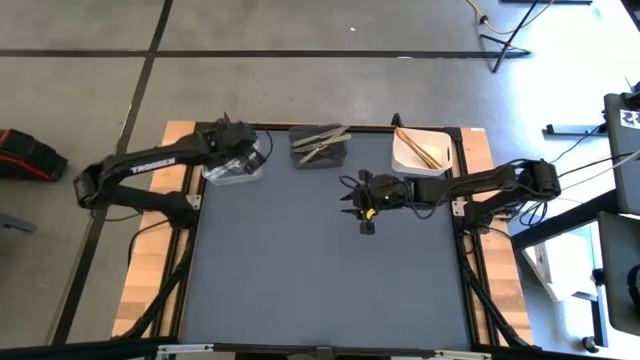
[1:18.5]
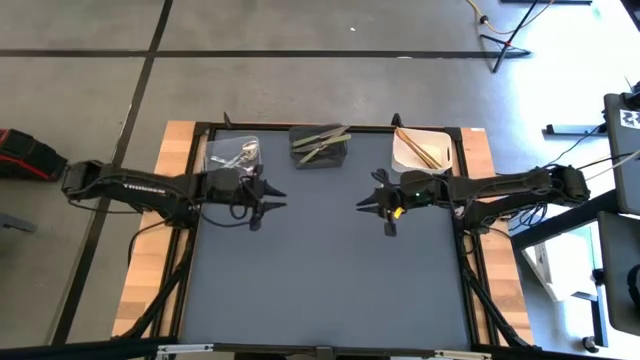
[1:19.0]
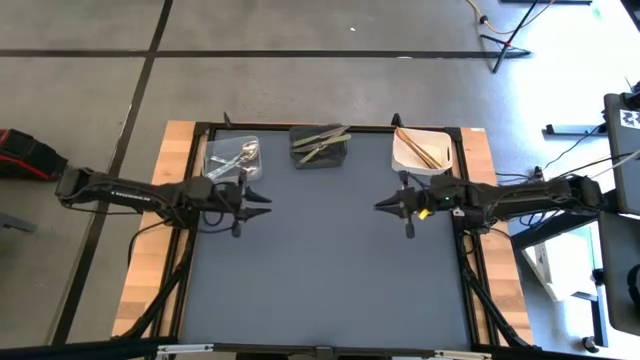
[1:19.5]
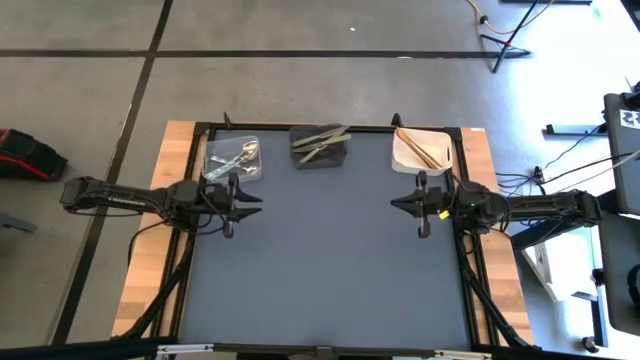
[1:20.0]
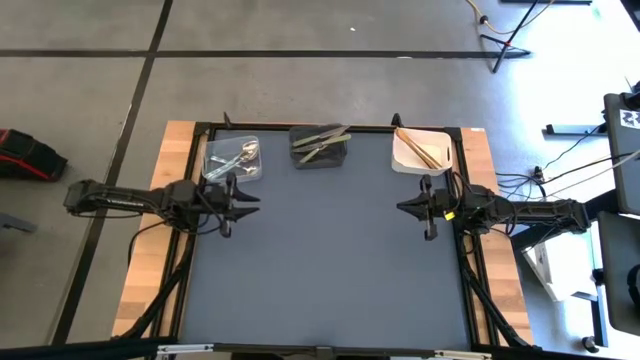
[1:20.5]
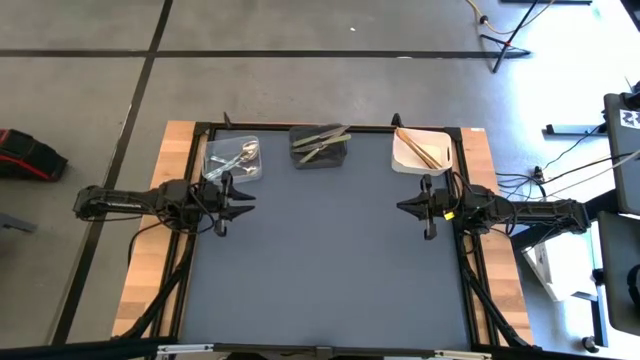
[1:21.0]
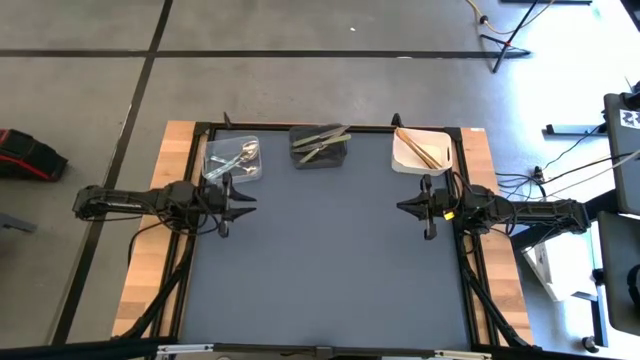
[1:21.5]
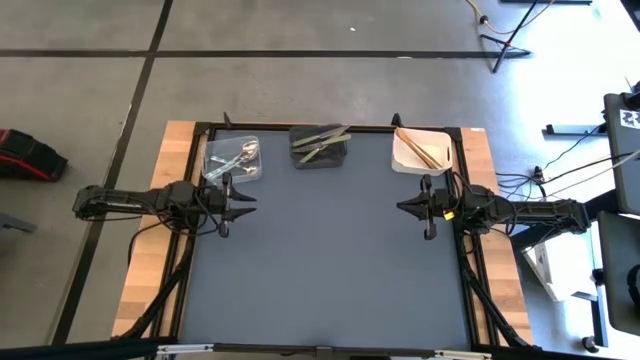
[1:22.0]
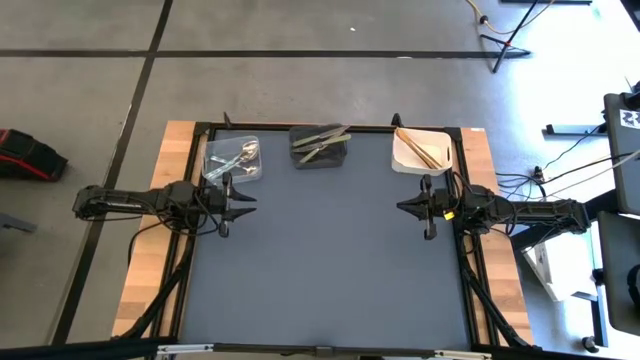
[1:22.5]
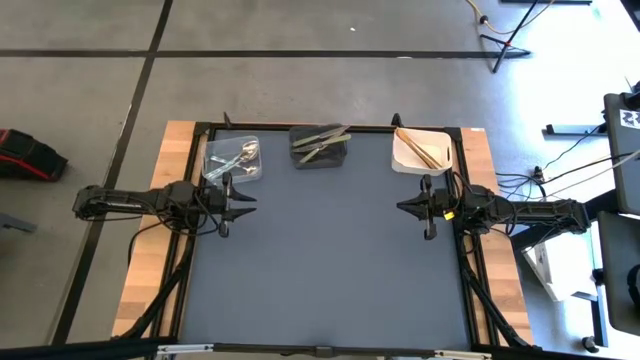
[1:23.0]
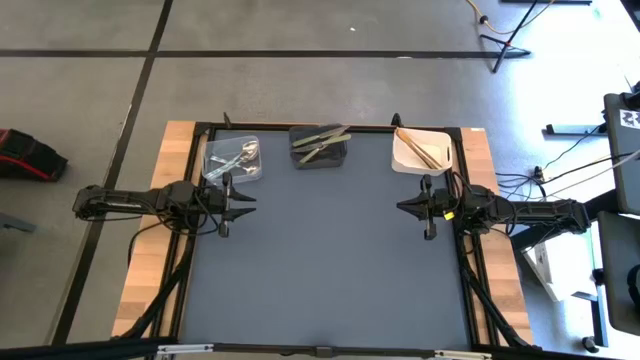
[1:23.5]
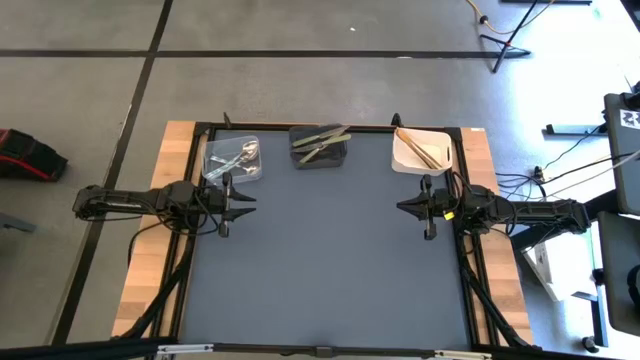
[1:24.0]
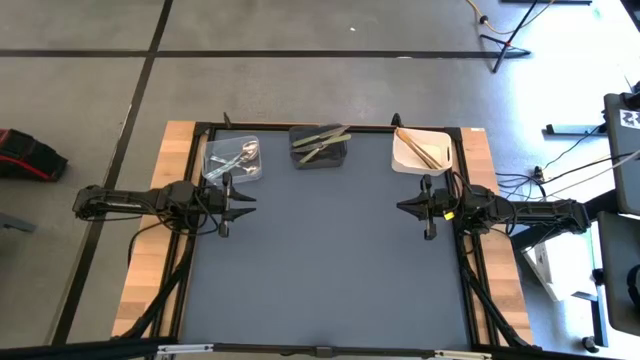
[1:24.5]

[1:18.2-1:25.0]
Task: Sort silverware by color (type)
Return to Home Position

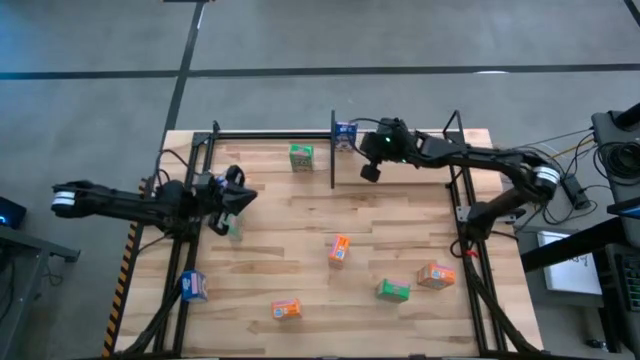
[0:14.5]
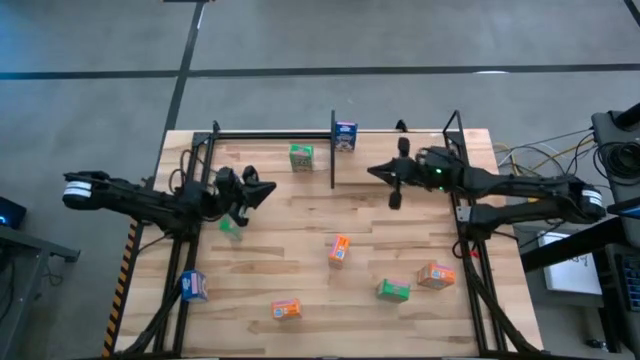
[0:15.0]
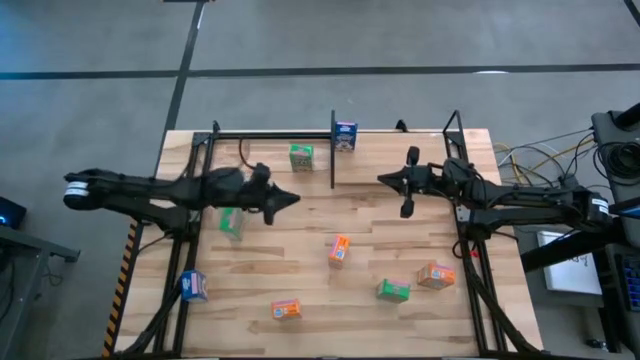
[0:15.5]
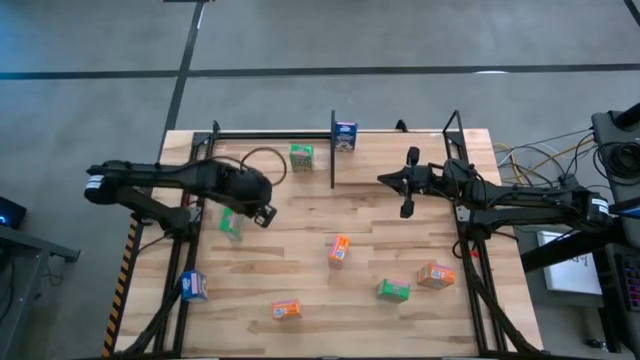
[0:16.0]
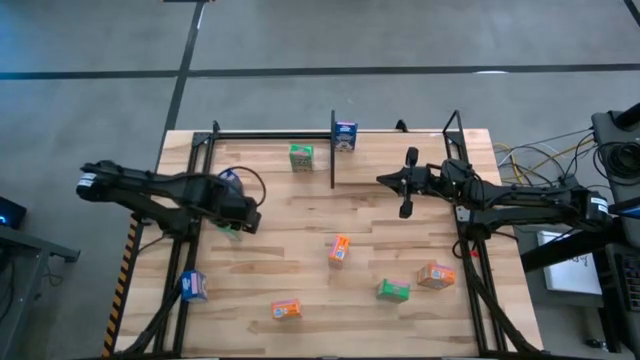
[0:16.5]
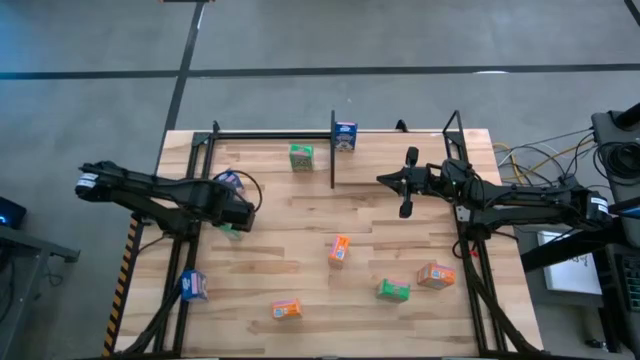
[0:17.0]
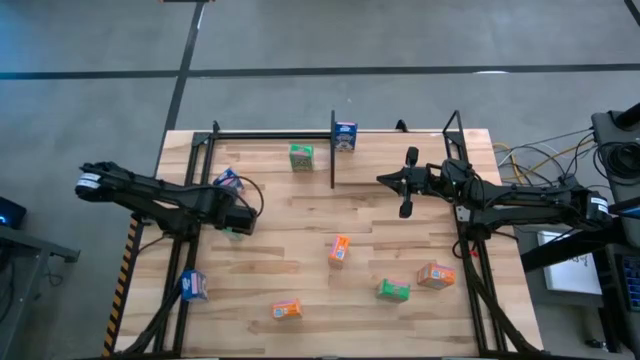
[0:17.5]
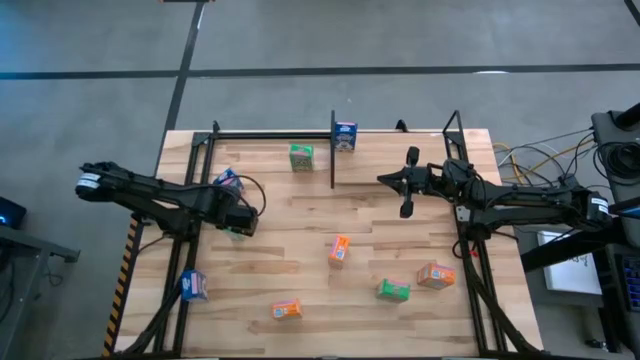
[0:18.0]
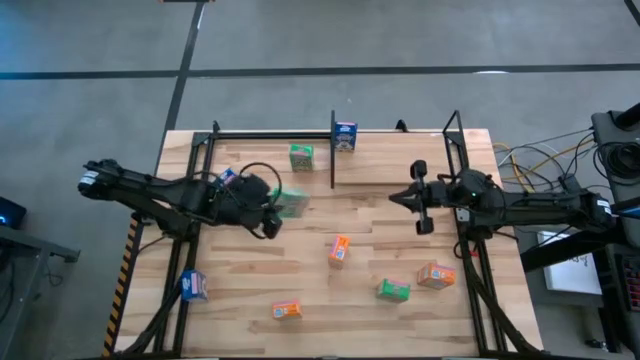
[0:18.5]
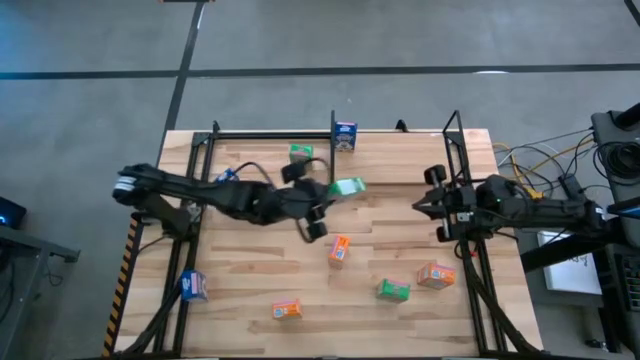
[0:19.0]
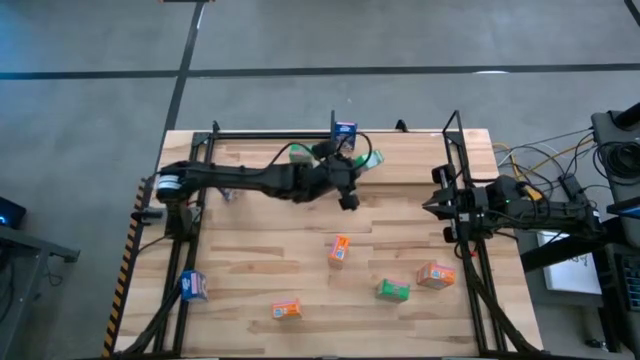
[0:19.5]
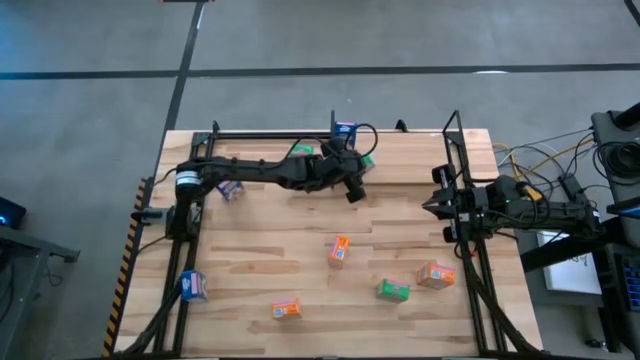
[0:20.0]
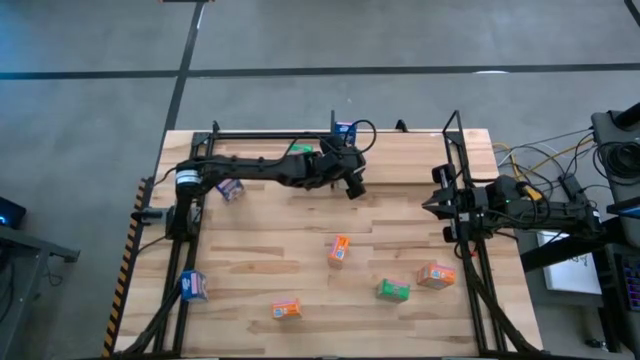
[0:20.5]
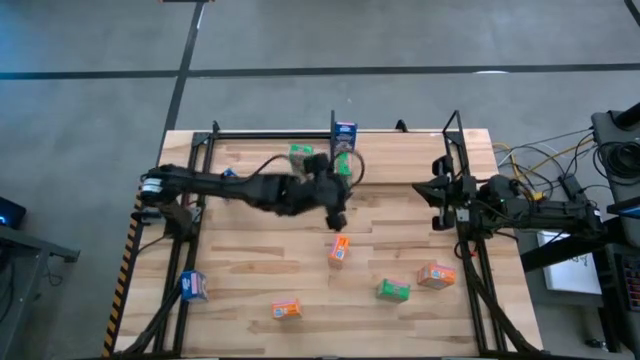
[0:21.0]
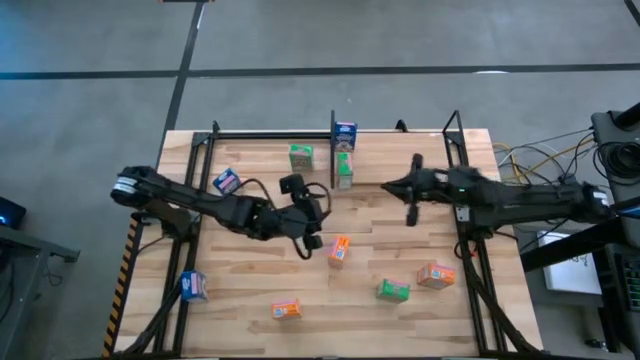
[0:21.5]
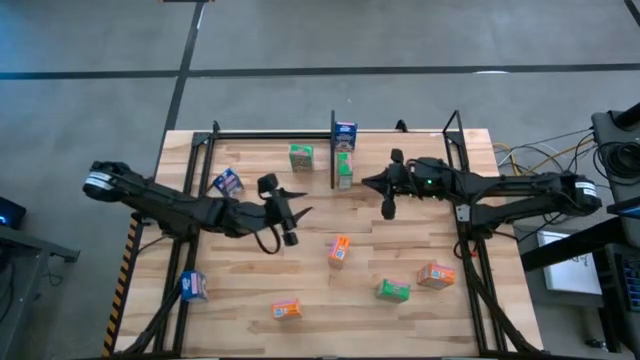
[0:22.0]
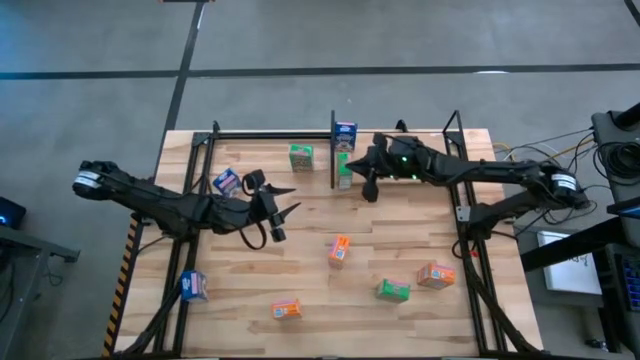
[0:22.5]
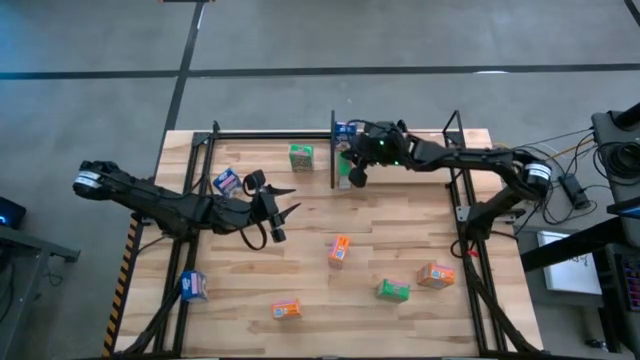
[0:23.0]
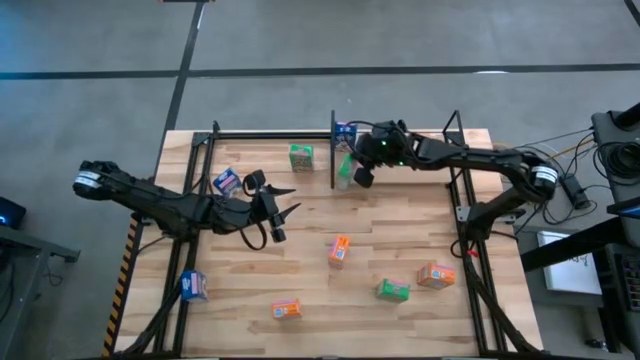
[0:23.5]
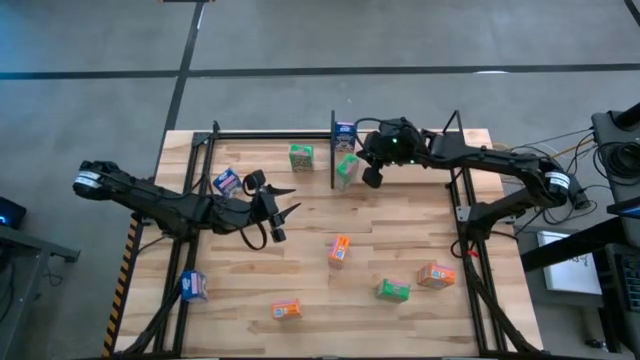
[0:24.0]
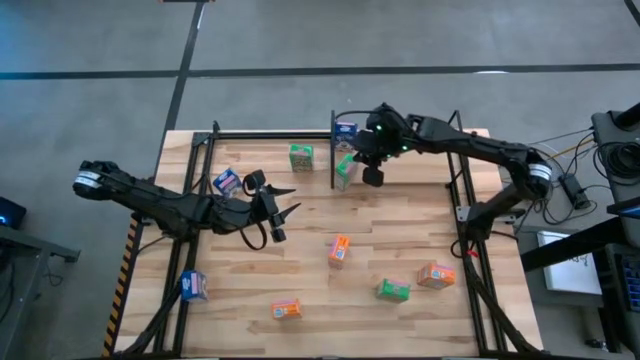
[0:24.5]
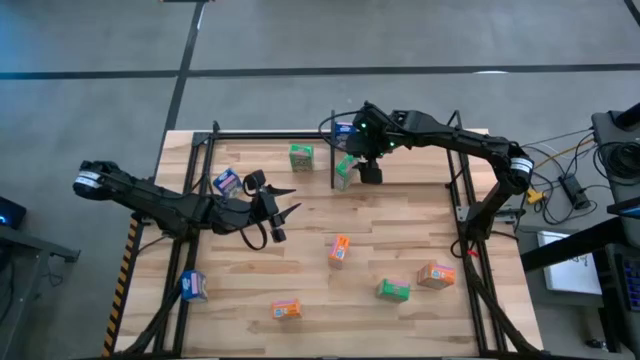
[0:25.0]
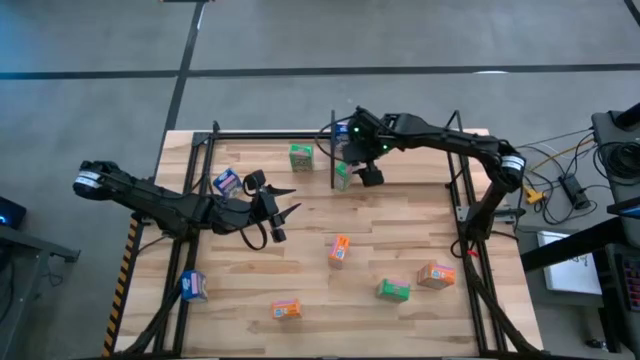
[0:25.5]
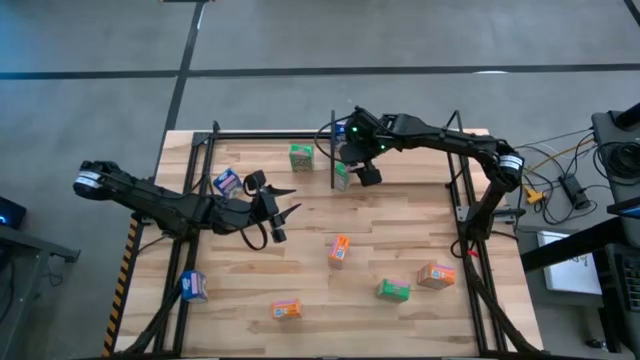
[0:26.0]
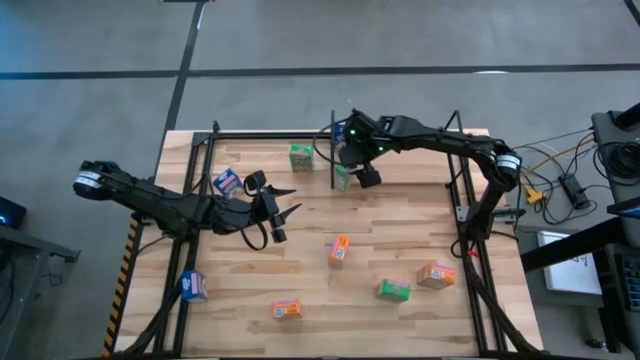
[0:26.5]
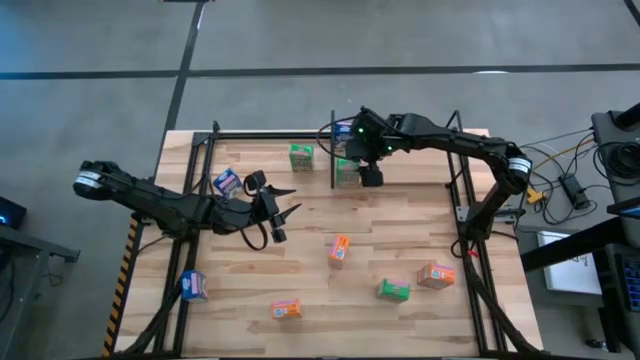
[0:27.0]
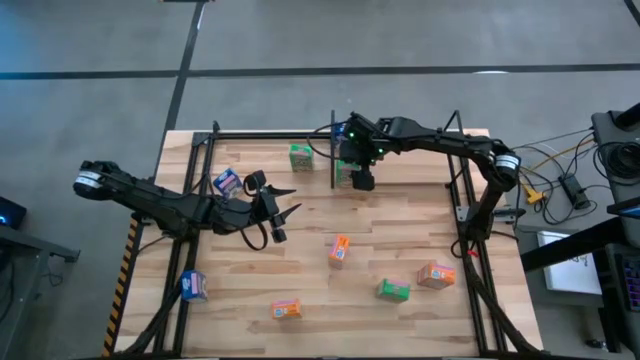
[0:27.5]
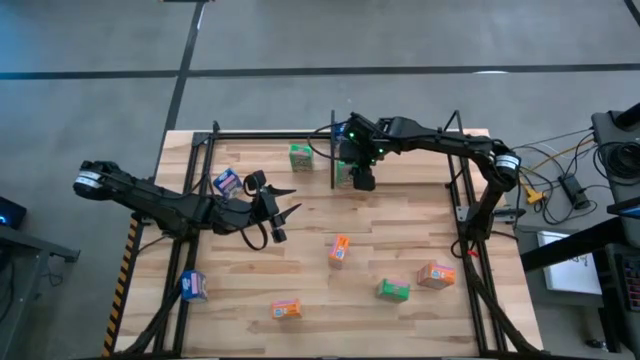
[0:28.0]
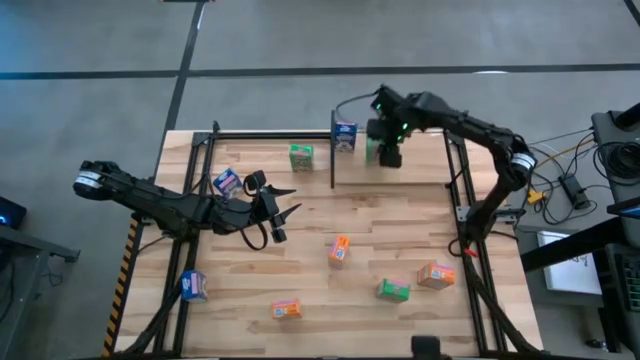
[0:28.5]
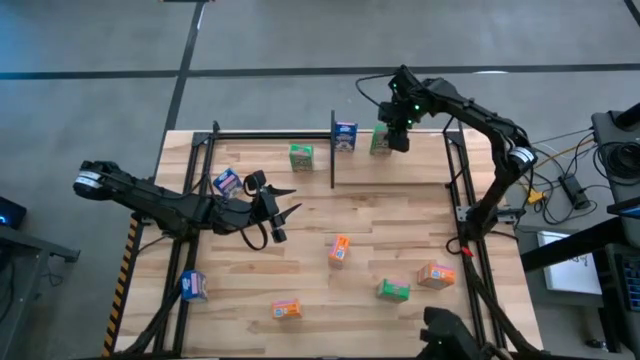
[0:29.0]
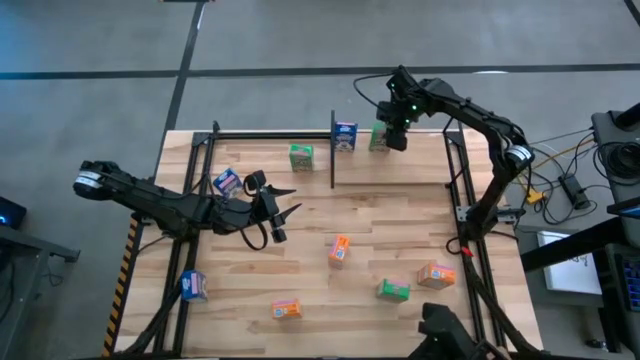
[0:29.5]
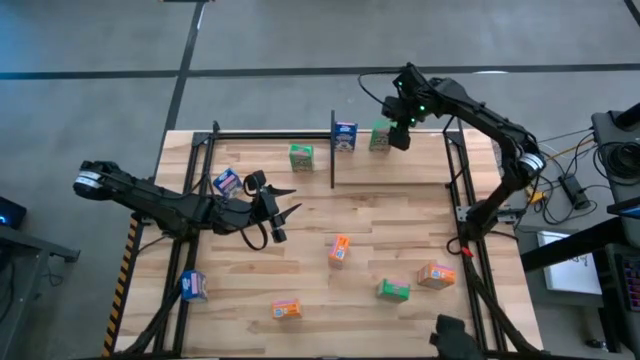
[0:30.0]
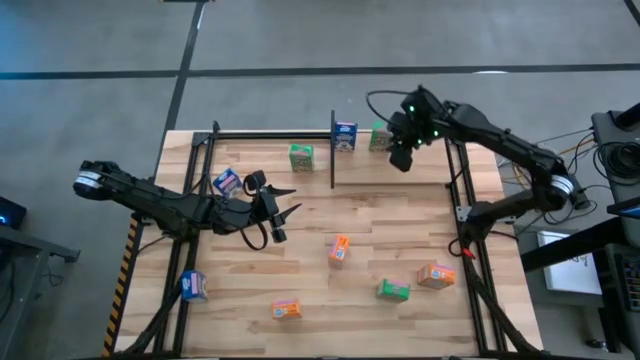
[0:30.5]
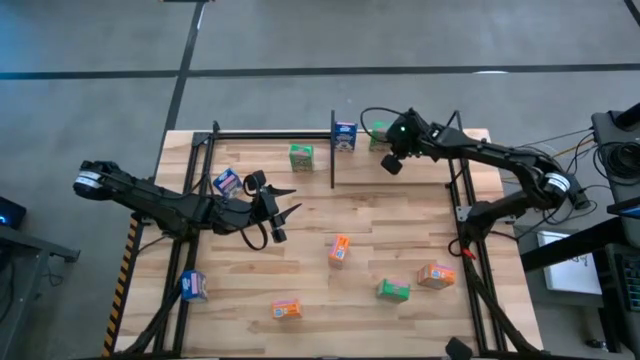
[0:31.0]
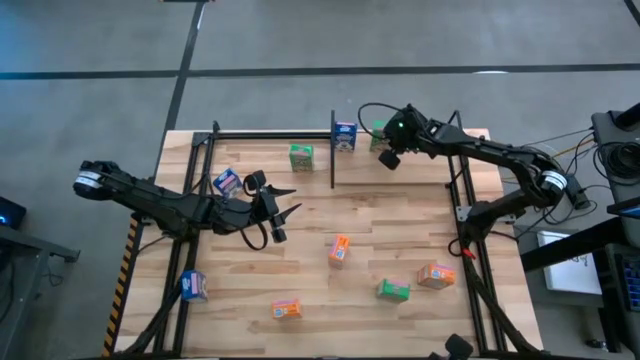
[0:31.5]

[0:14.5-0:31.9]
Task: Stack cereal on shelf
Put the middle left green cereal box on the shelf
